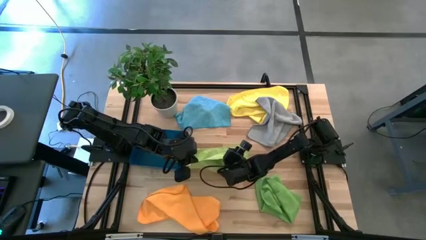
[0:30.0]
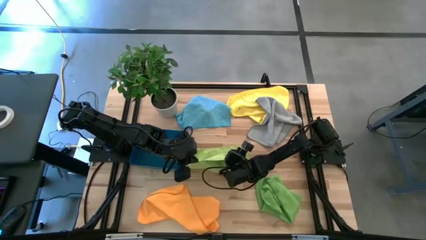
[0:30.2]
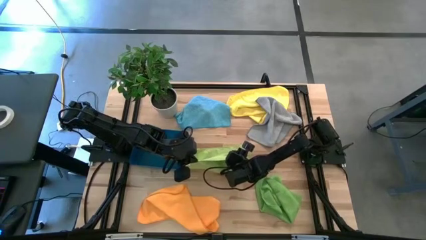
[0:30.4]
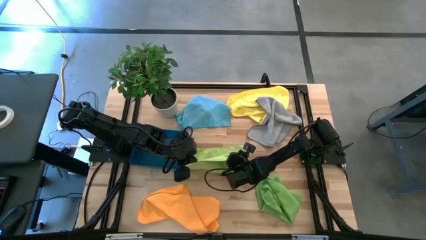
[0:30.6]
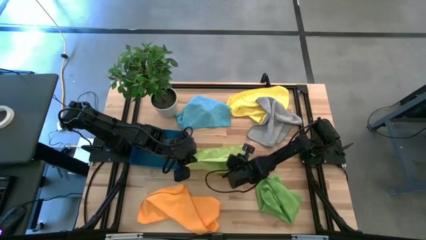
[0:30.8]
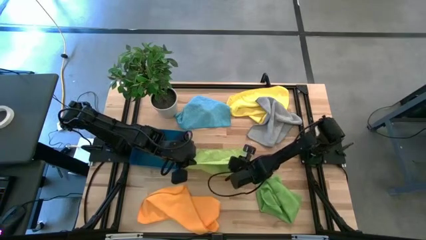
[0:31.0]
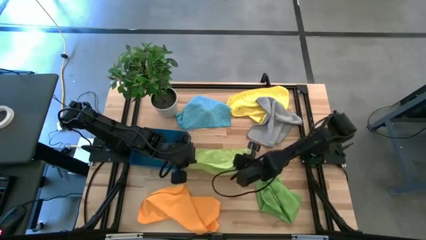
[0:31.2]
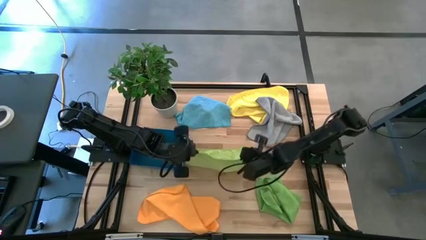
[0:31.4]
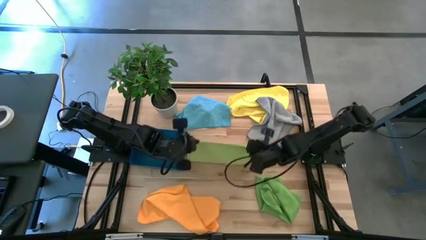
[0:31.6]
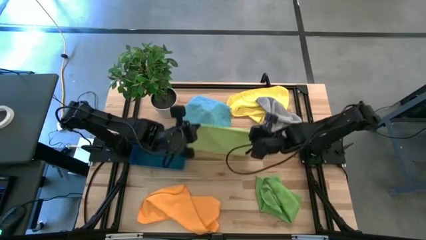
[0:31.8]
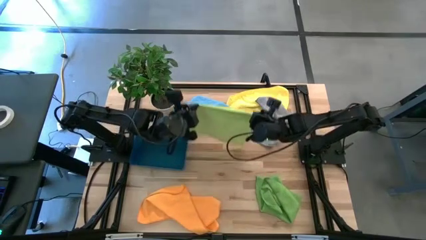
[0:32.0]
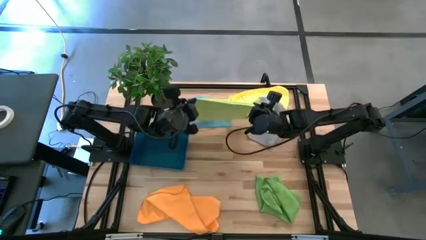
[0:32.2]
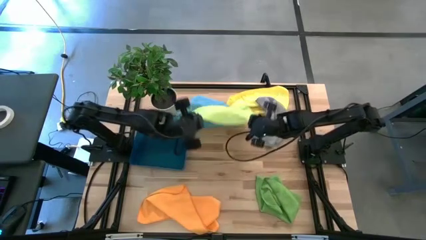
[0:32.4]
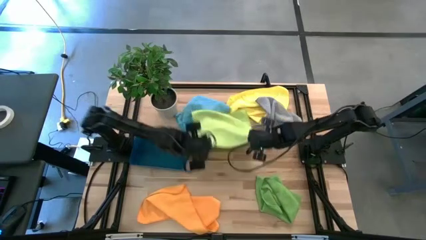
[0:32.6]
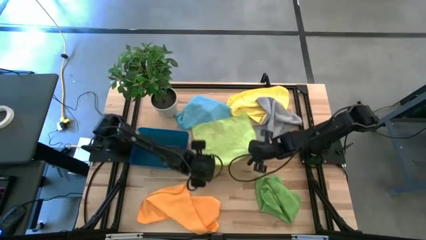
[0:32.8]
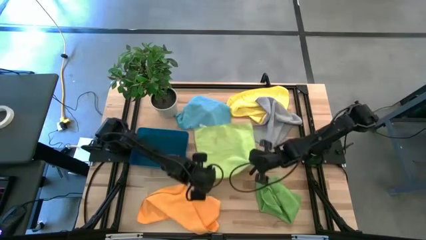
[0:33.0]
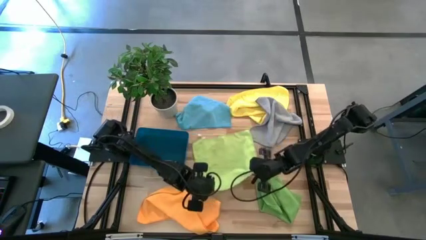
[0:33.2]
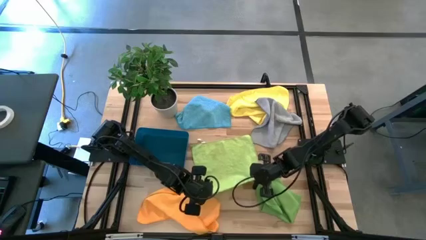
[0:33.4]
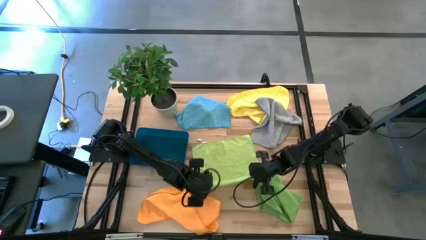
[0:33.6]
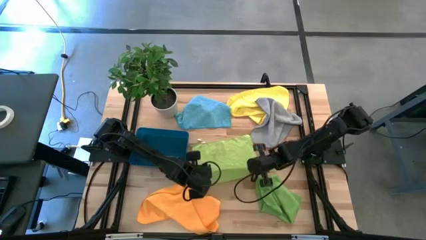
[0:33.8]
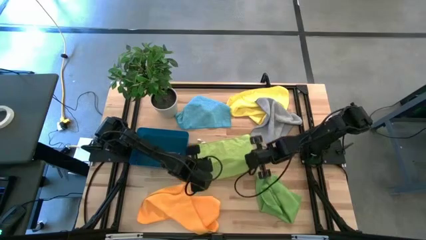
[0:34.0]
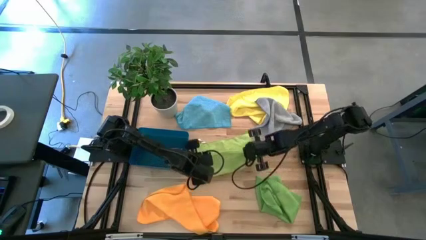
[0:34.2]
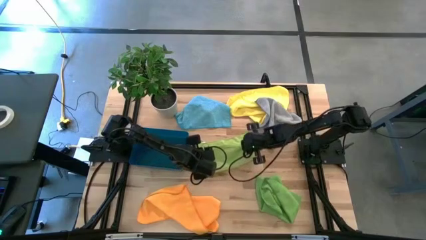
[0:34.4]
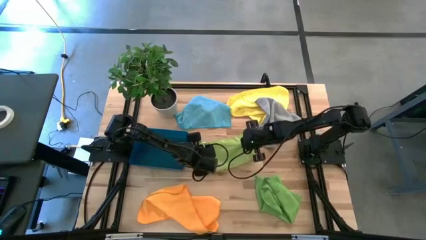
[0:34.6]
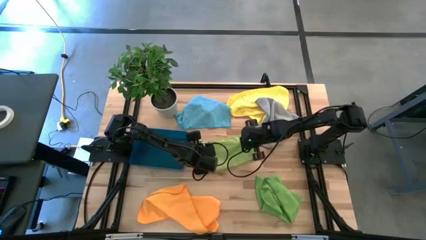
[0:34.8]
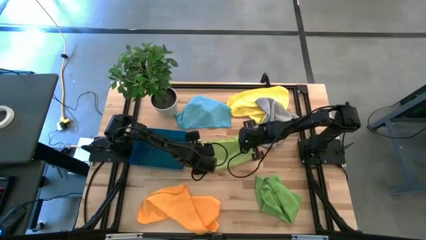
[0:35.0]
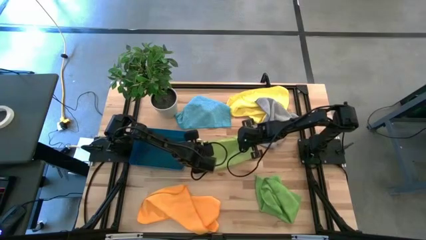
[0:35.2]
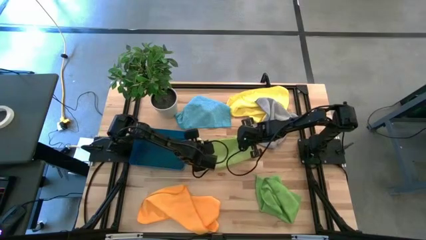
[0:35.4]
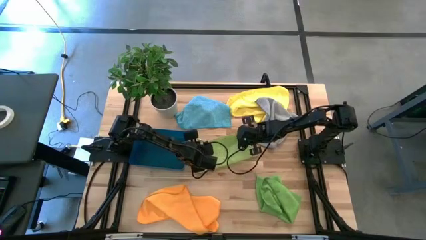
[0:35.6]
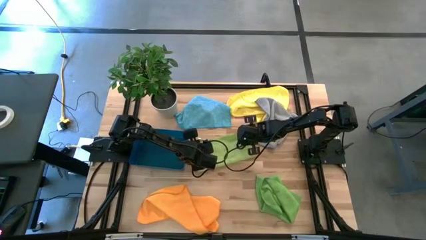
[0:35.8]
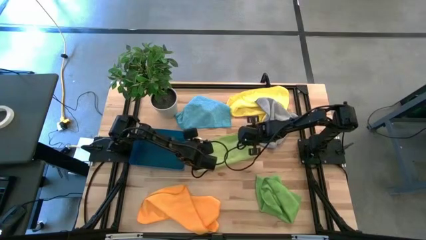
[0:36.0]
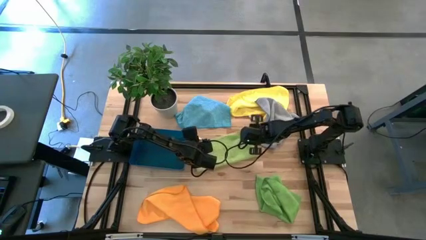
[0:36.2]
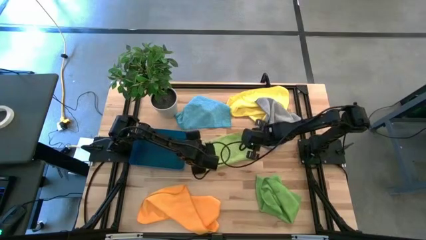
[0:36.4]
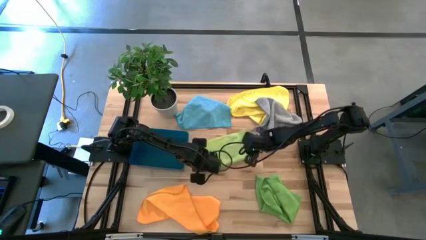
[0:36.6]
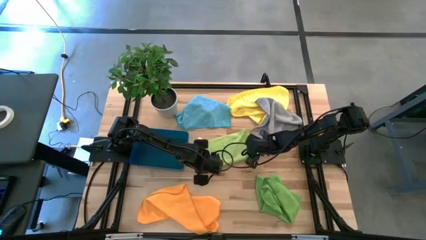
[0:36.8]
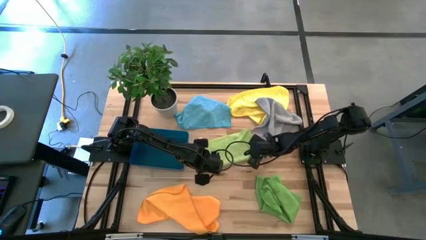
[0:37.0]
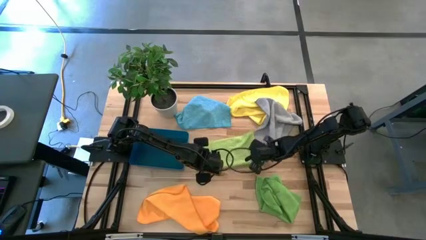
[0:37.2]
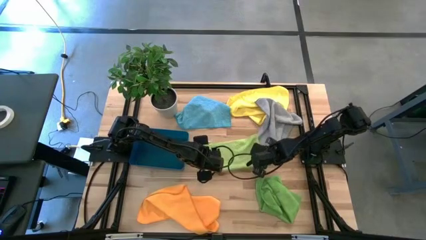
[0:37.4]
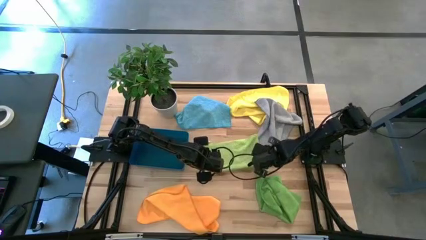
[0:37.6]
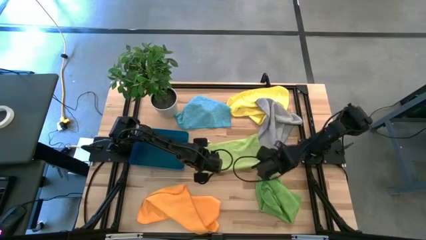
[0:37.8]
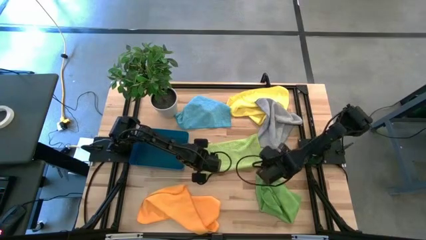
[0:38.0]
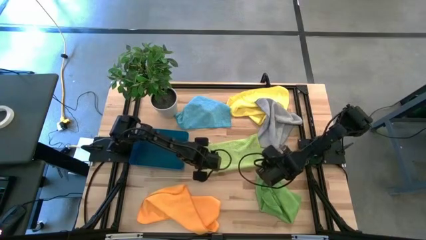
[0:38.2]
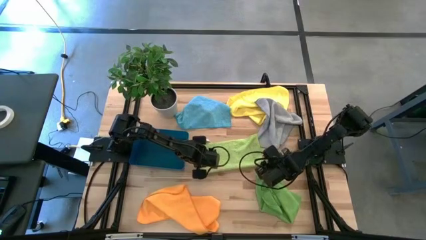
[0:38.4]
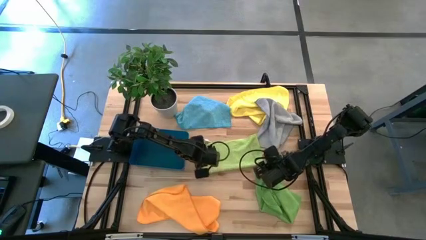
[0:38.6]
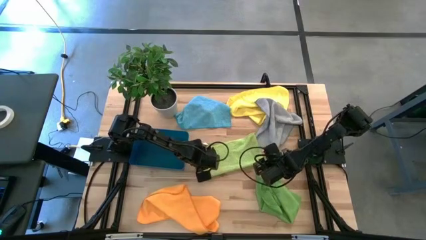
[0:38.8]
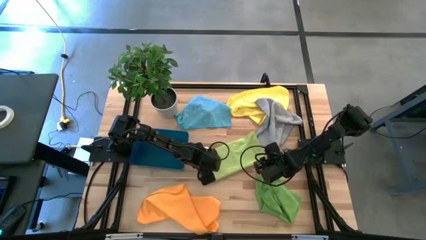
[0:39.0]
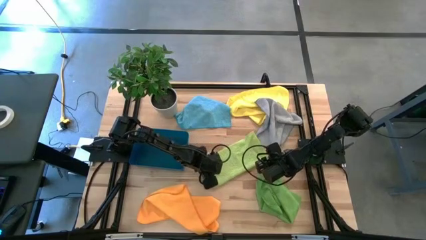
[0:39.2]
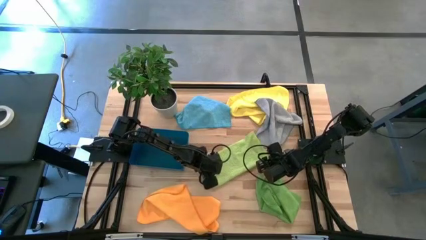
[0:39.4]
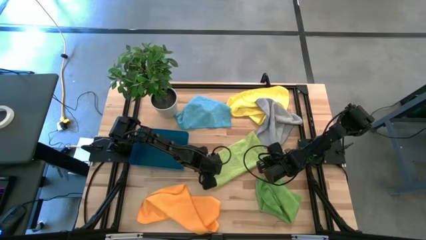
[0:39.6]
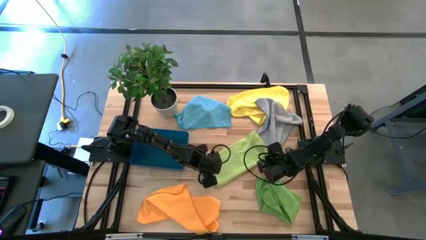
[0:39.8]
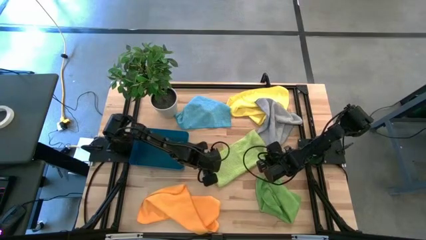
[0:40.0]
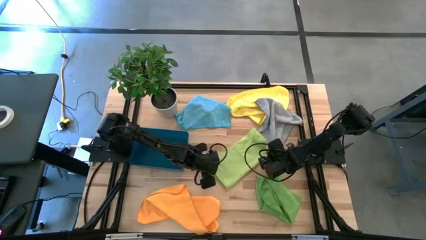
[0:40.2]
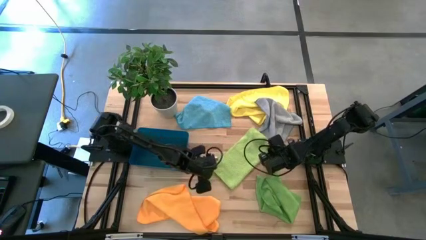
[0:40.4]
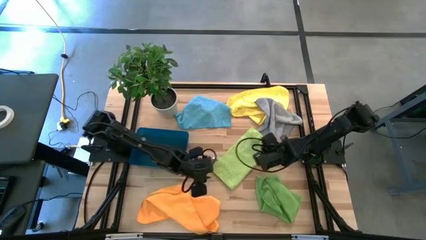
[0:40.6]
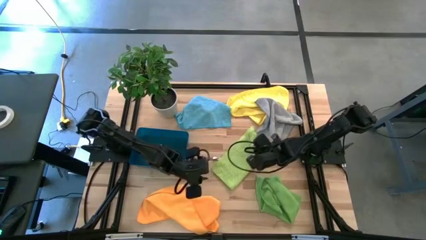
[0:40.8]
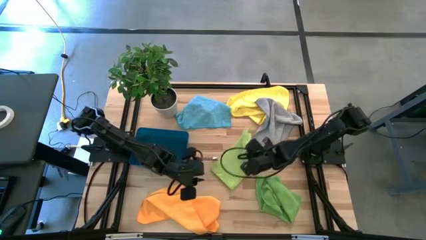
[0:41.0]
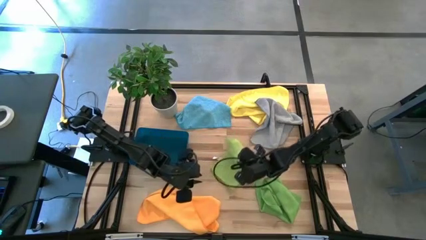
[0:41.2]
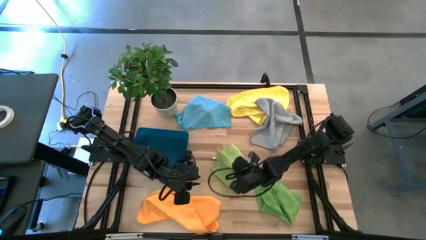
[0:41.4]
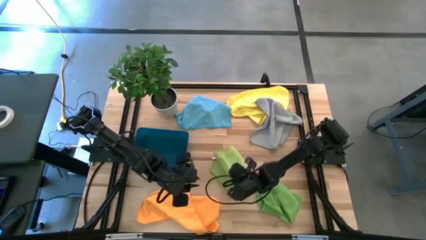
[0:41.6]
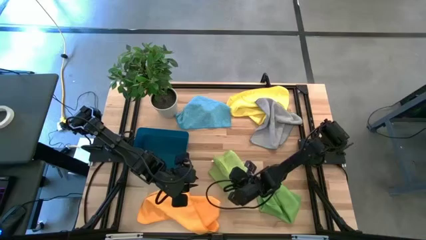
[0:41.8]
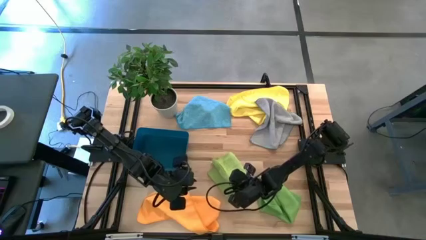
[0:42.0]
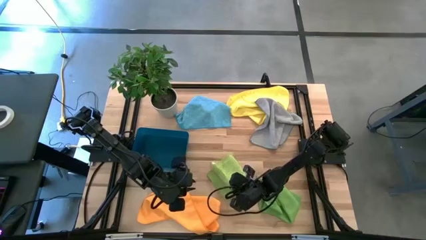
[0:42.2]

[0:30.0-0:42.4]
Task: Fold microfiber towels
Fold the light green microfiber towel on the table
